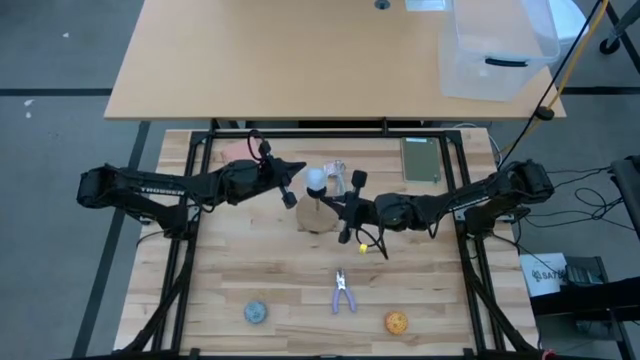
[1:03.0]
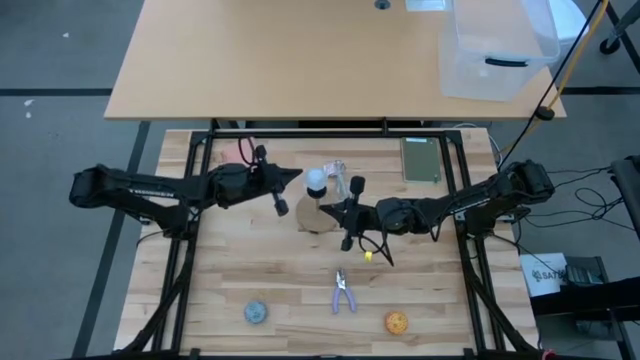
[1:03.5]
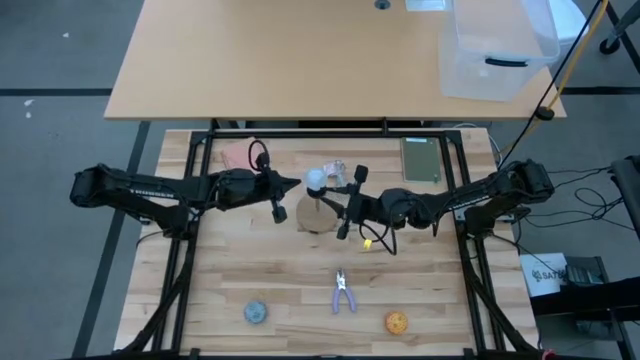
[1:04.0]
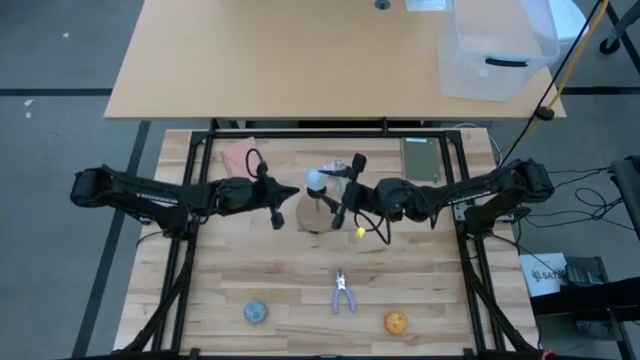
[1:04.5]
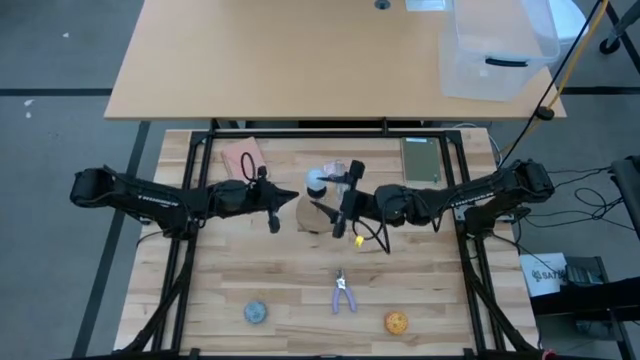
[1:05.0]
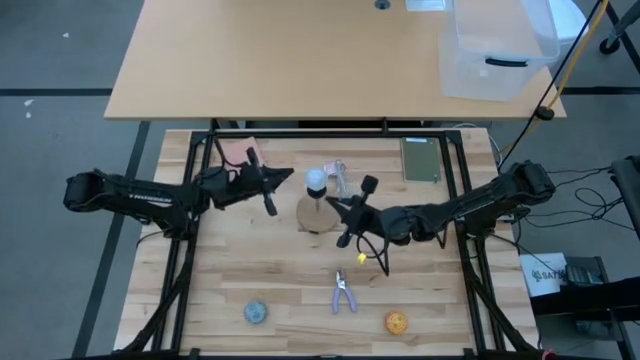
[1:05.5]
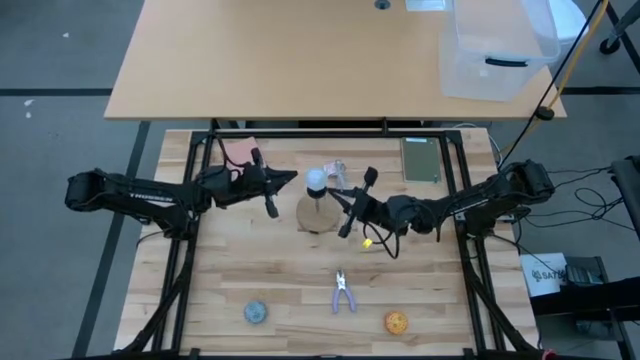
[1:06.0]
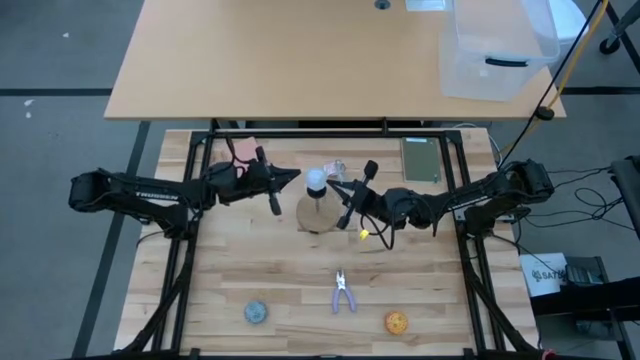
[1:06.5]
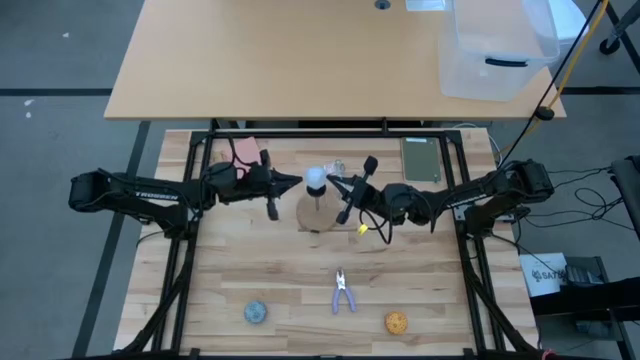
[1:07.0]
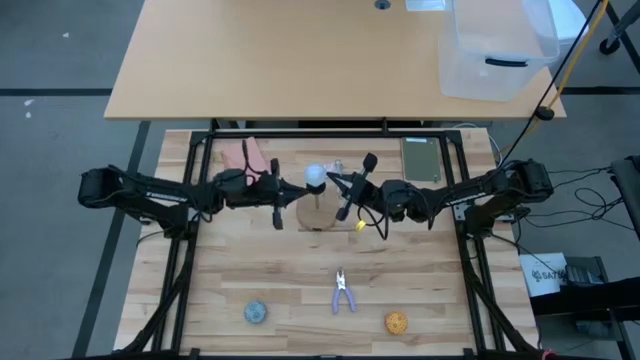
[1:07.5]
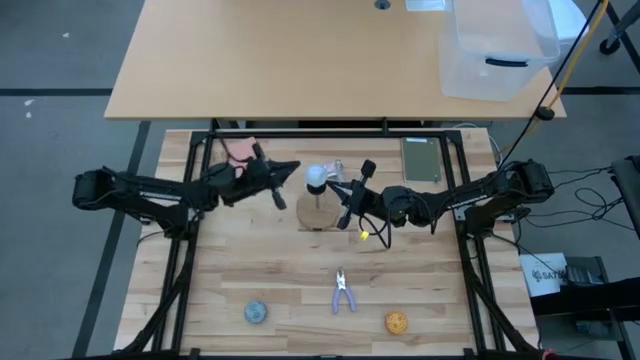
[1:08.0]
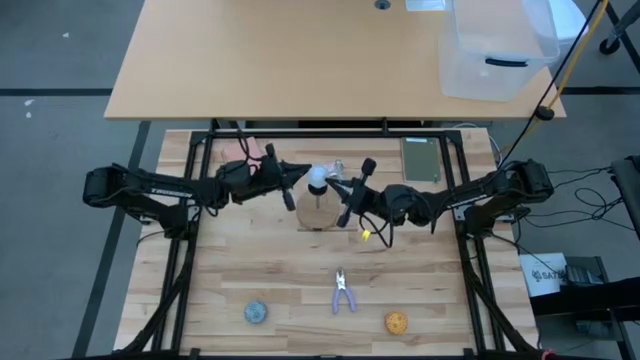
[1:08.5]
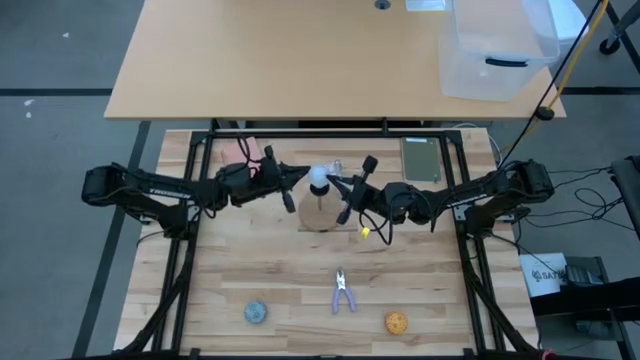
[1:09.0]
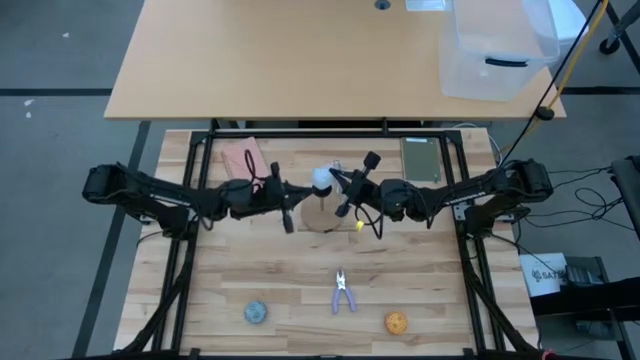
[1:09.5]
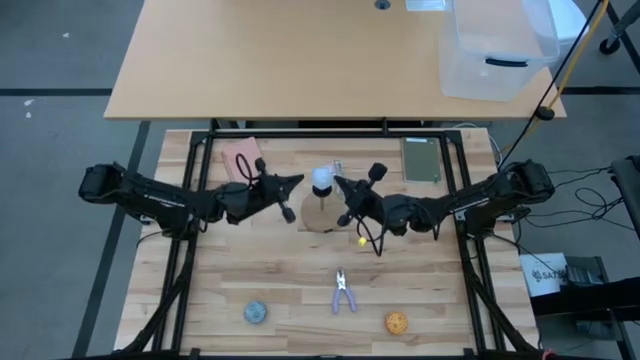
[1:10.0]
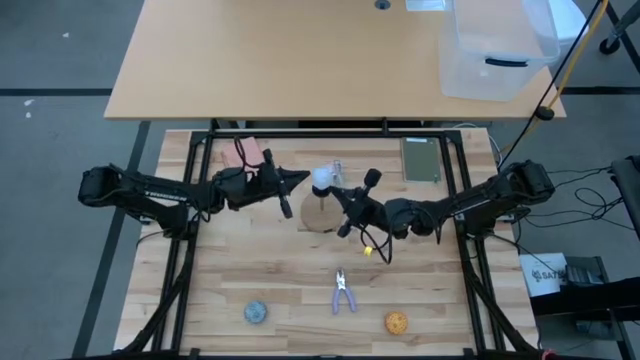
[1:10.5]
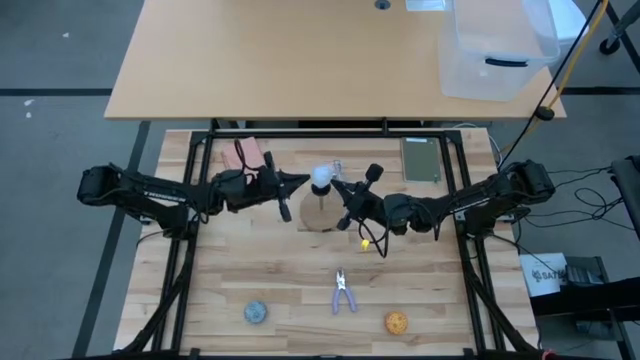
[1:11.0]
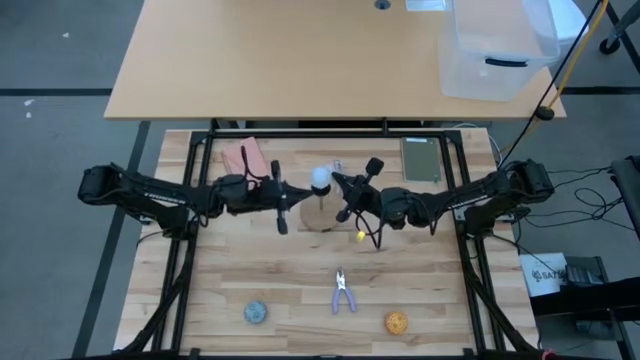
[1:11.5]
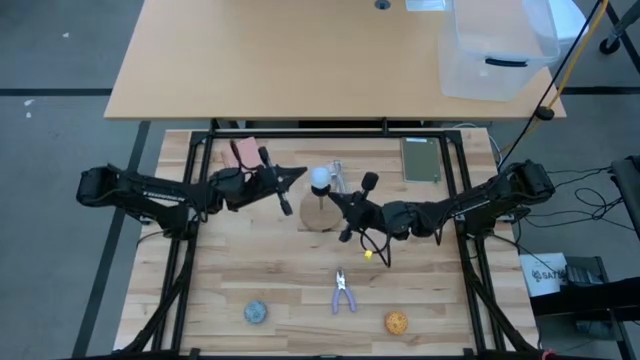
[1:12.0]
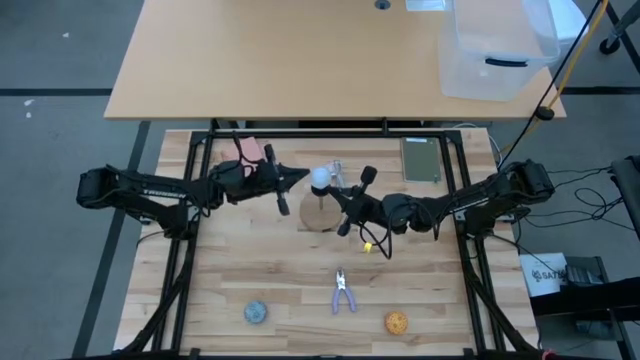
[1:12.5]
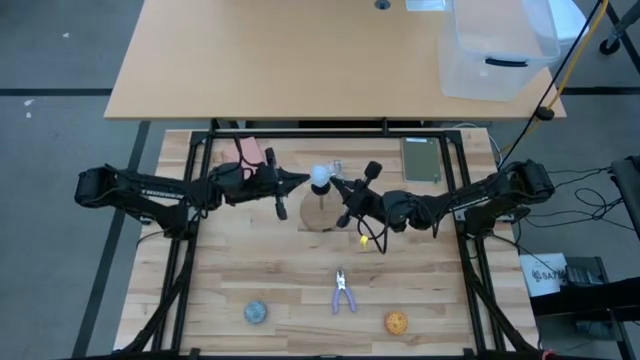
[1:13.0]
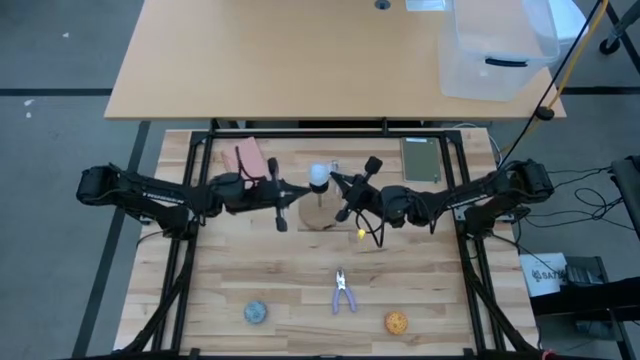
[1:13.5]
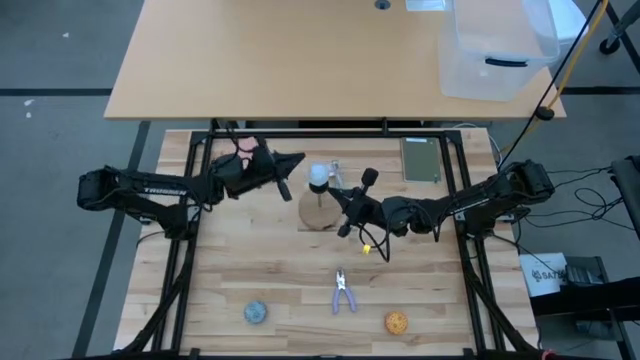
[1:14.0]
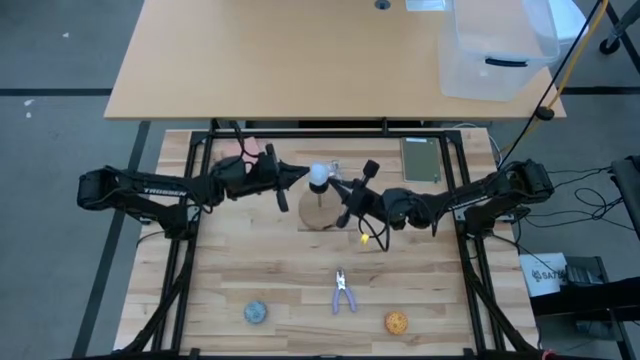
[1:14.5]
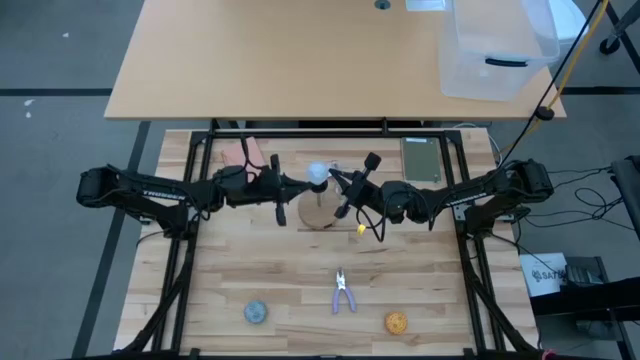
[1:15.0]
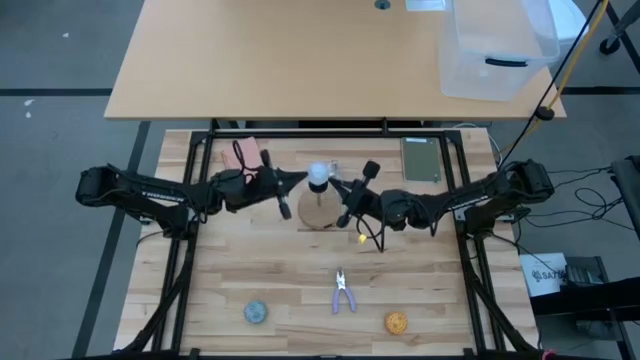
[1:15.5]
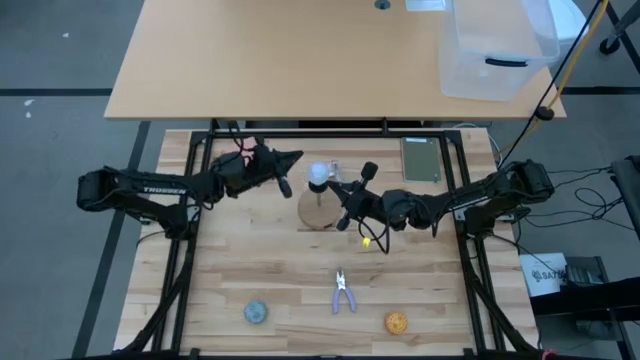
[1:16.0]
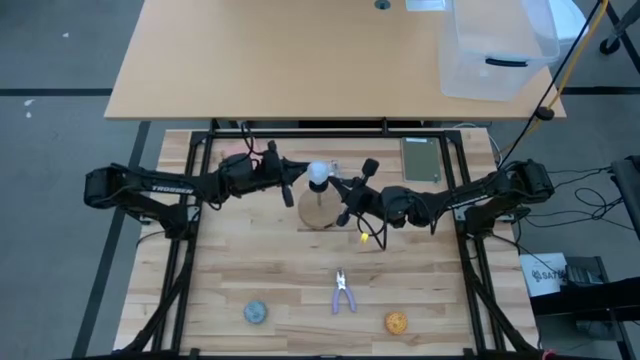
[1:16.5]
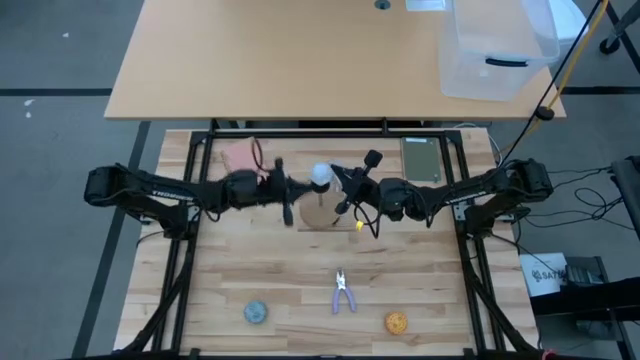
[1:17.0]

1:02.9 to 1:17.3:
Task: Screw lightbulb
Remove the lightbulb from the lamp

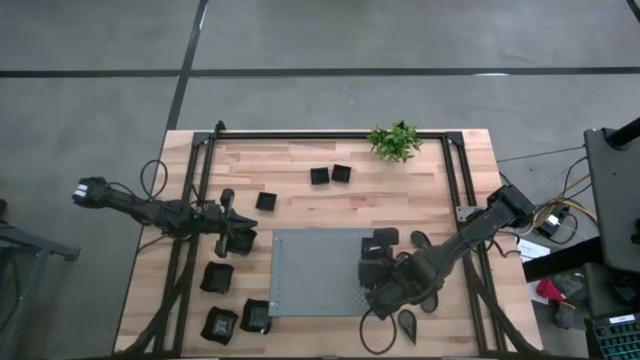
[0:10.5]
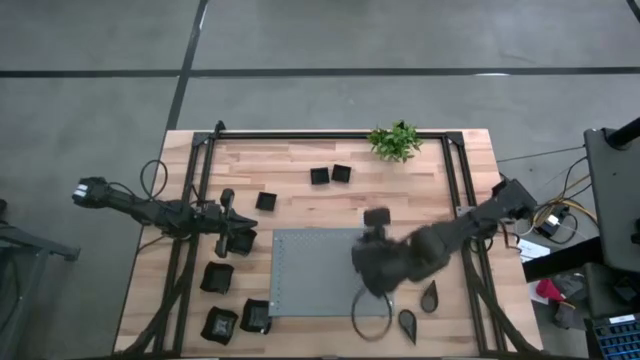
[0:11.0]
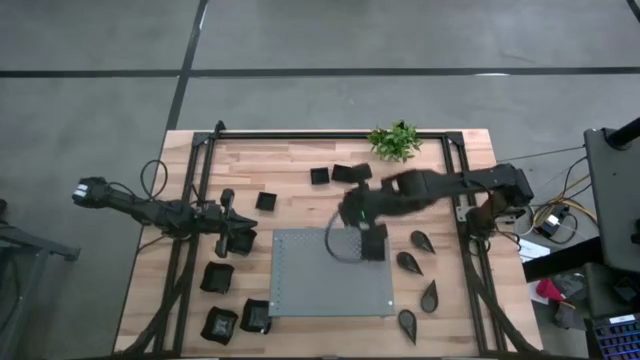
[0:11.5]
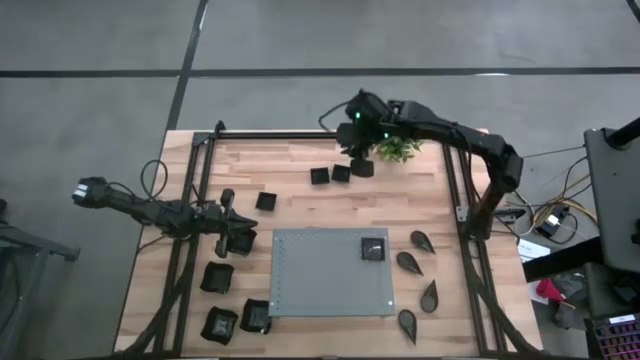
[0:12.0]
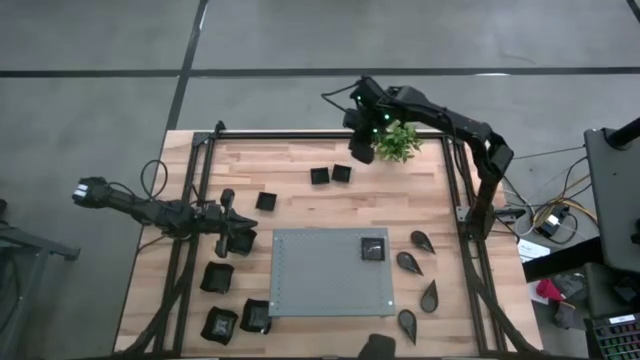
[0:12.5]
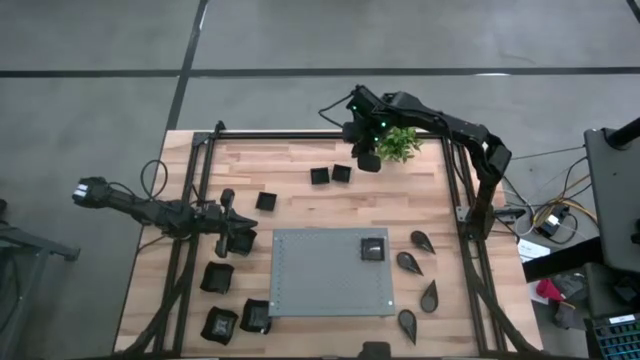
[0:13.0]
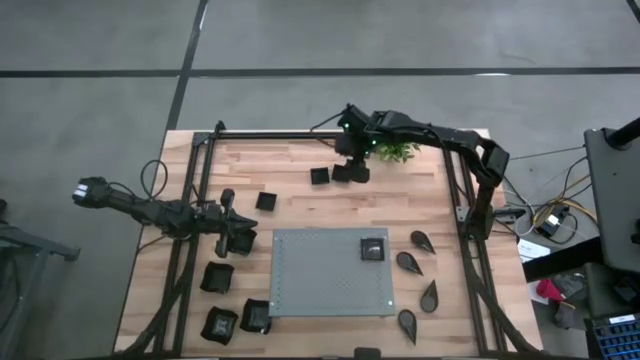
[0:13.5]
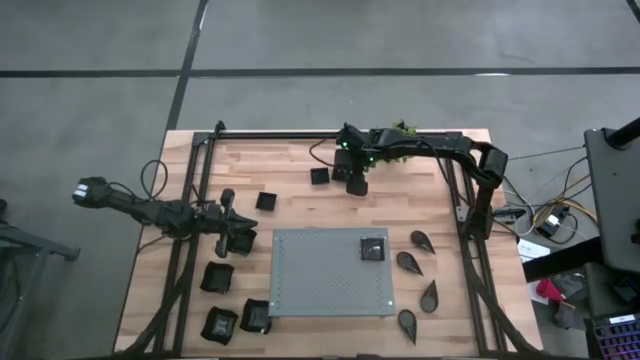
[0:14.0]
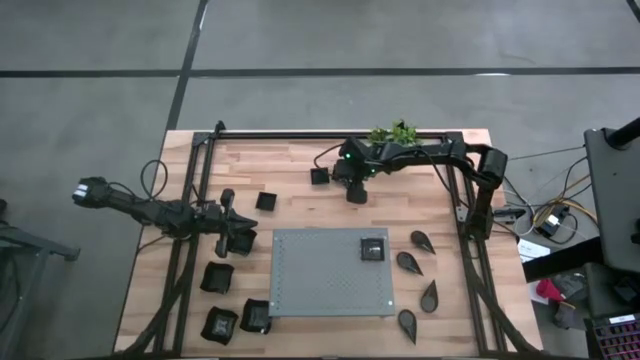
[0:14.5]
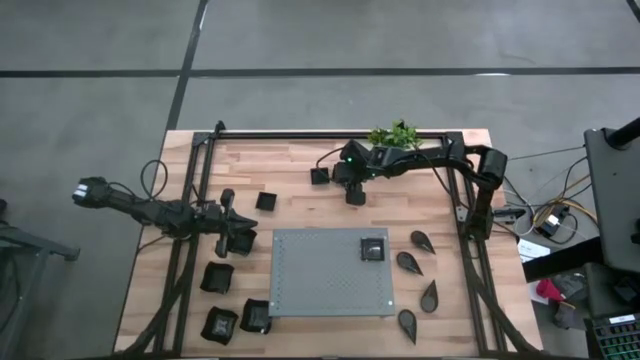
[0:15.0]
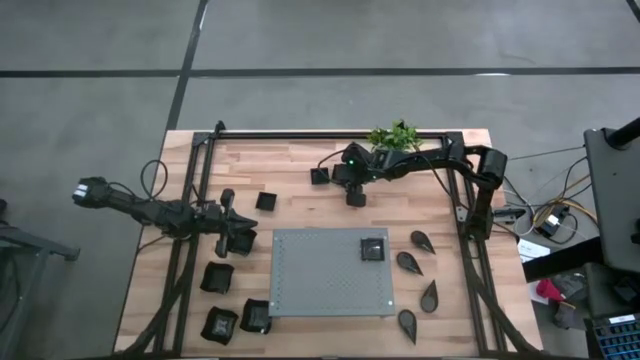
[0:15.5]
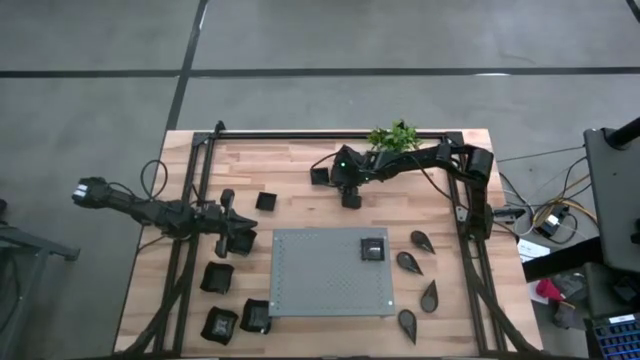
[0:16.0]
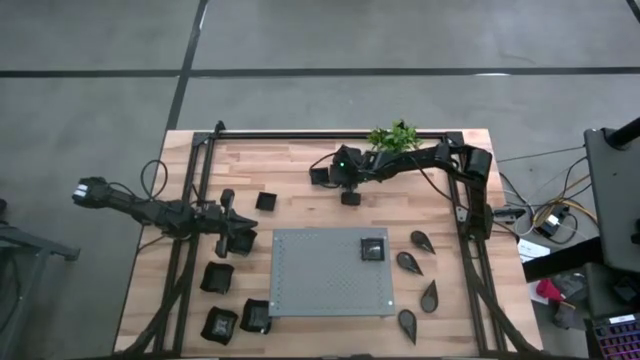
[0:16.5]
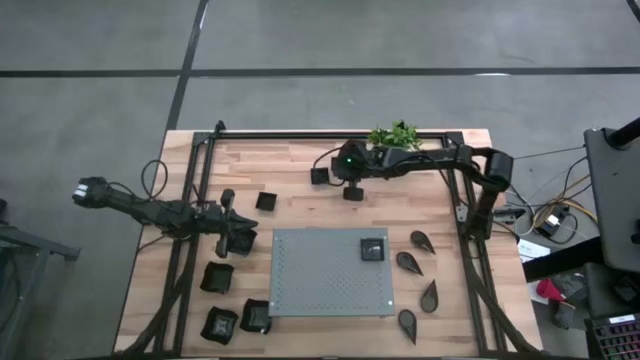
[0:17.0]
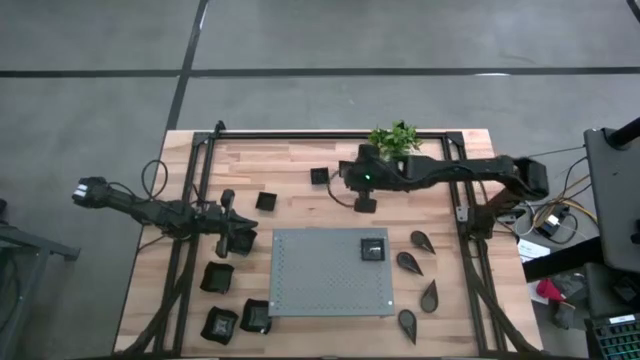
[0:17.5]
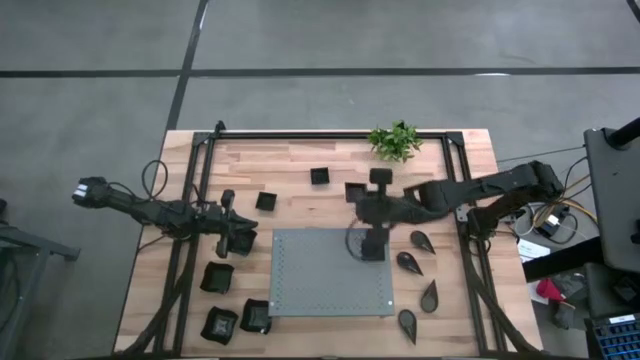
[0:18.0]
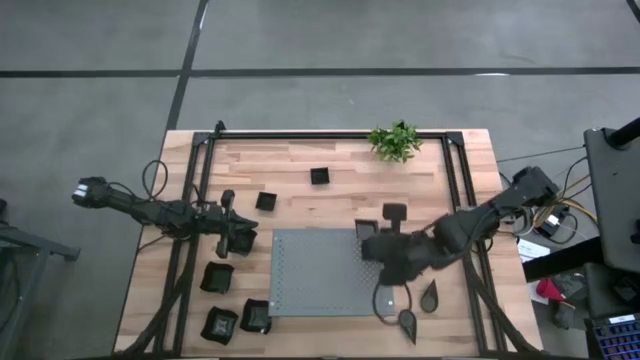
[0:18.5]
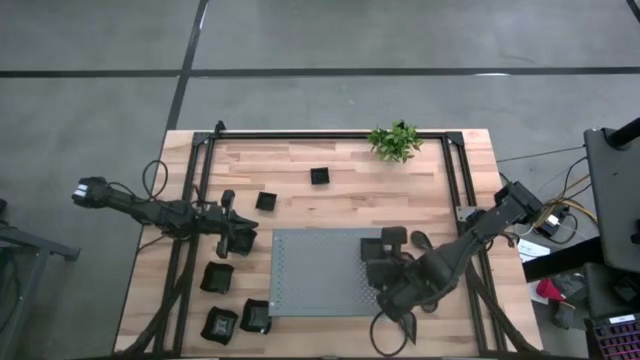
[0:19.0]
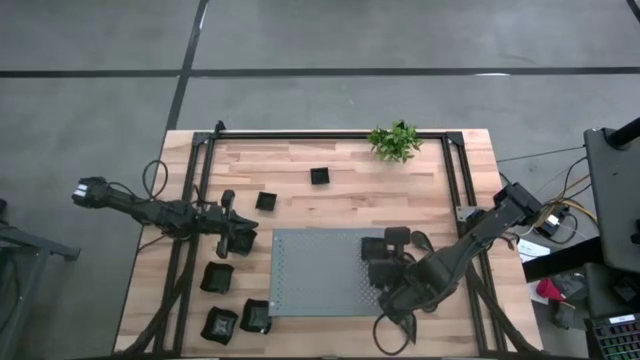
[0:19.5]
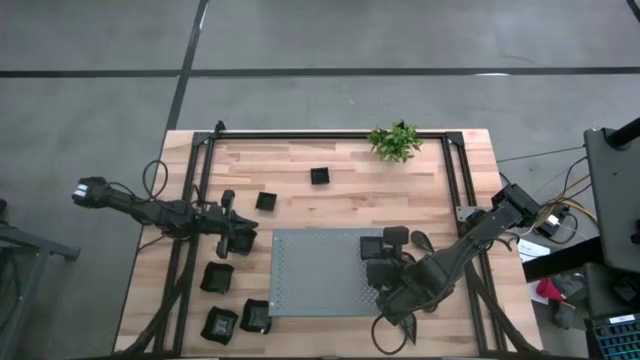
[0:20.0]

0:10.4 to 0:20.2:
Task: Pick & Place Mini shaped plates
Stack the square plate on top of the square plate on the shelf
